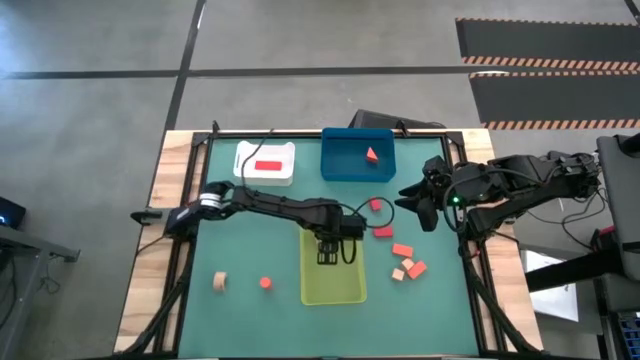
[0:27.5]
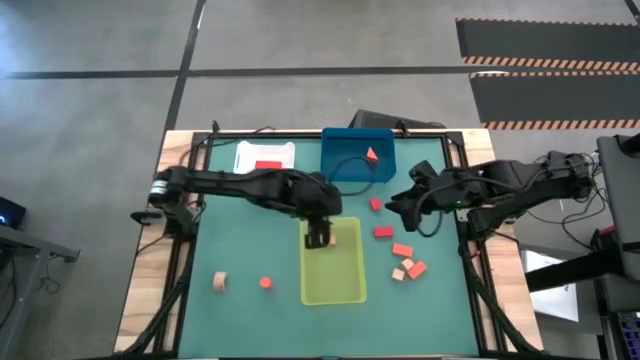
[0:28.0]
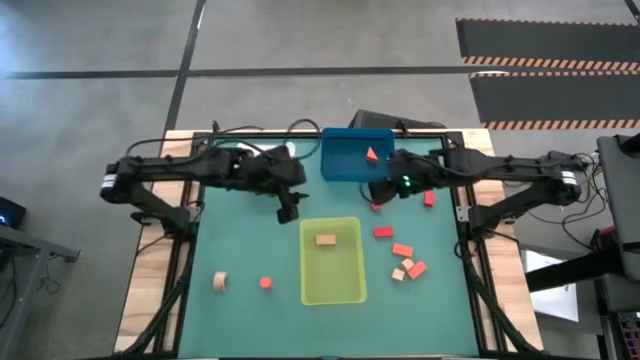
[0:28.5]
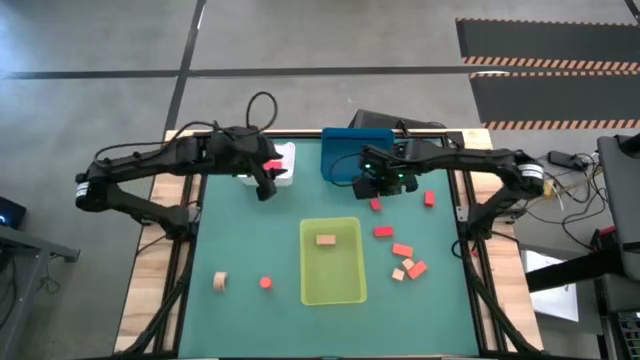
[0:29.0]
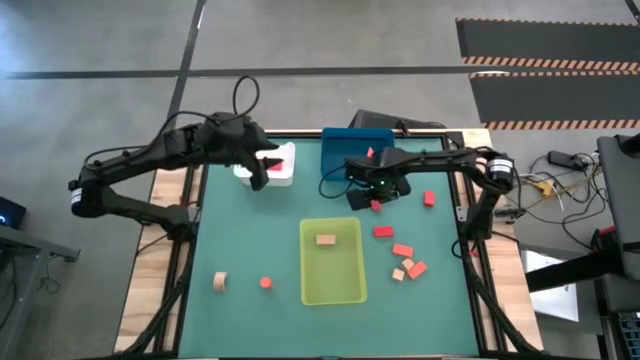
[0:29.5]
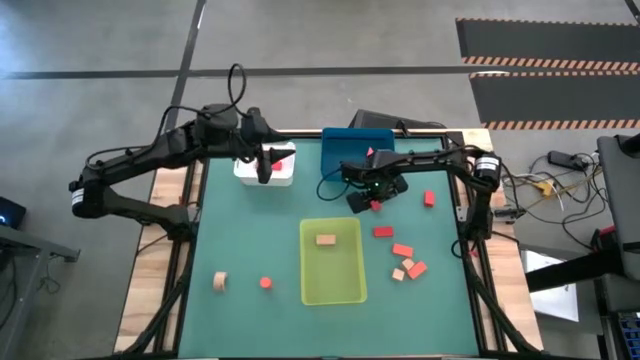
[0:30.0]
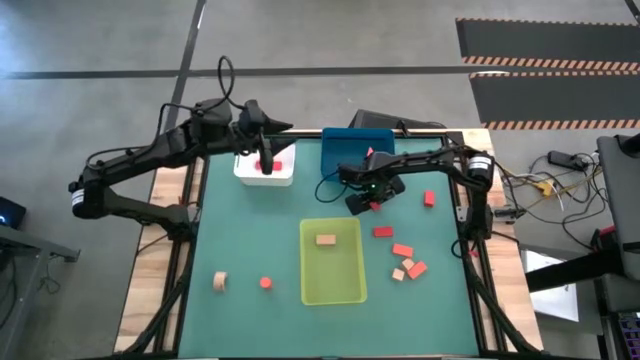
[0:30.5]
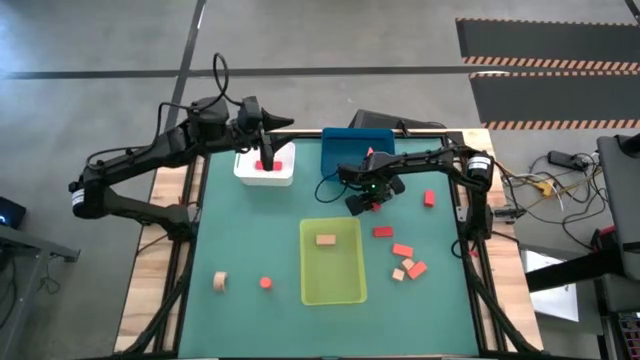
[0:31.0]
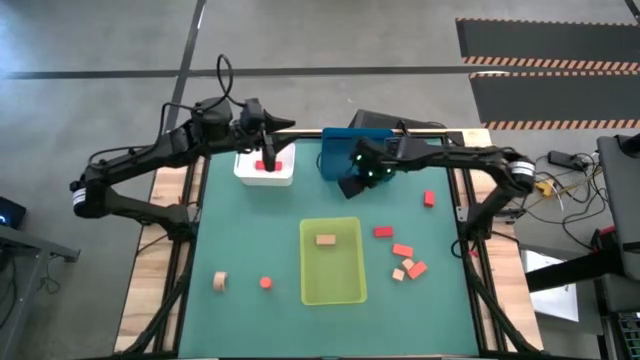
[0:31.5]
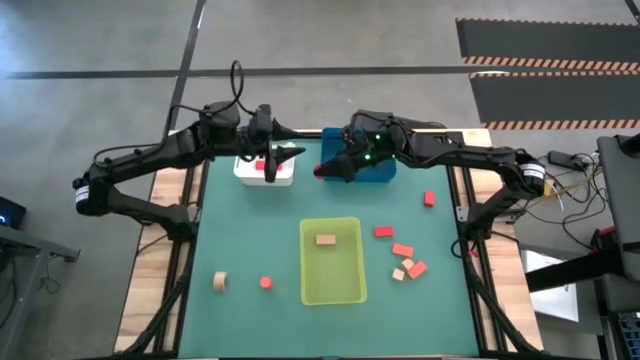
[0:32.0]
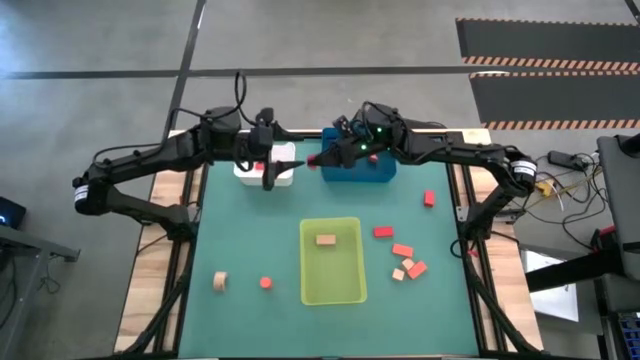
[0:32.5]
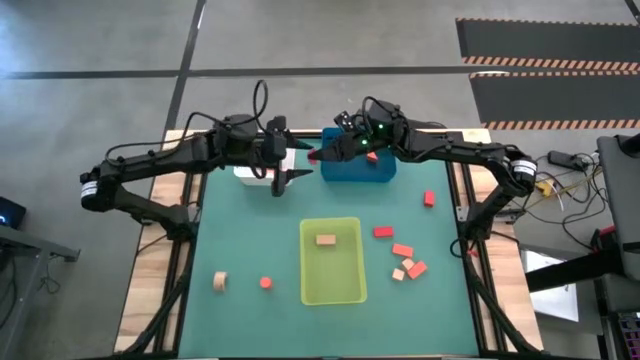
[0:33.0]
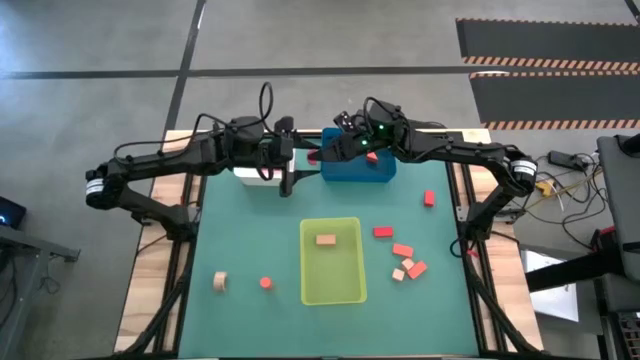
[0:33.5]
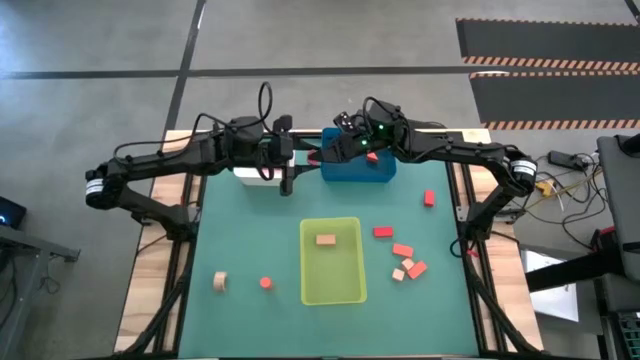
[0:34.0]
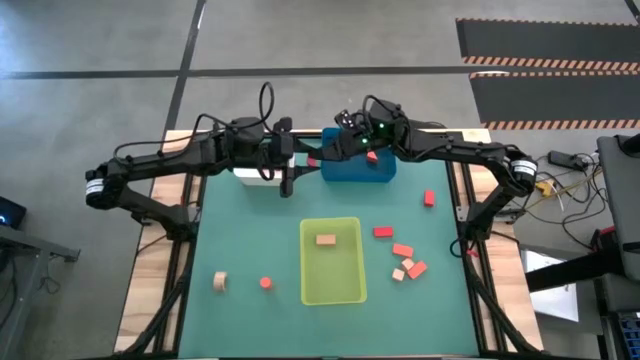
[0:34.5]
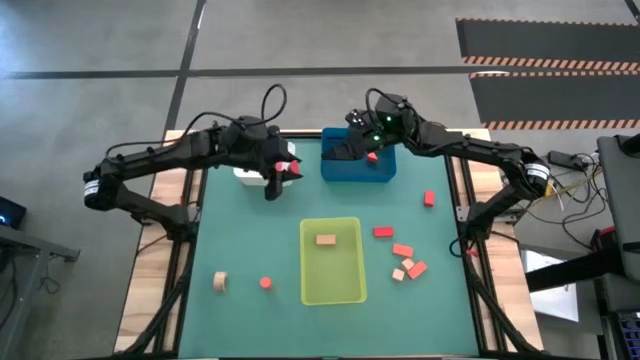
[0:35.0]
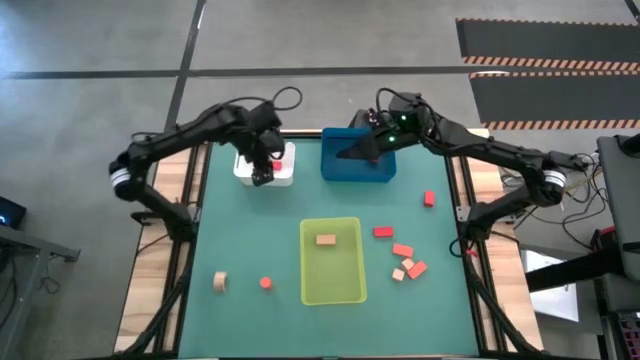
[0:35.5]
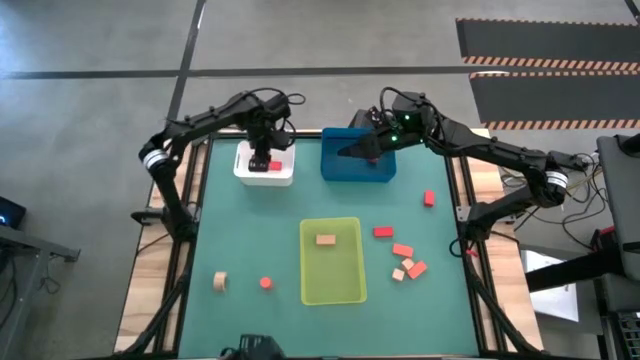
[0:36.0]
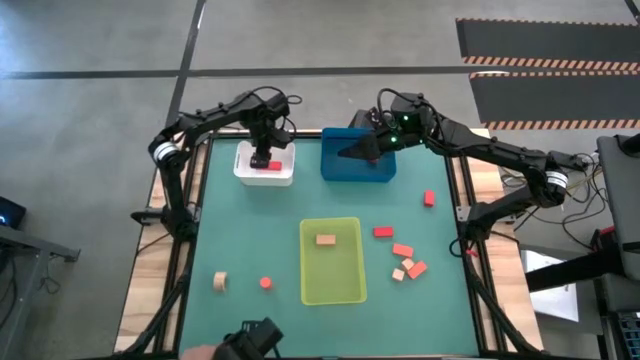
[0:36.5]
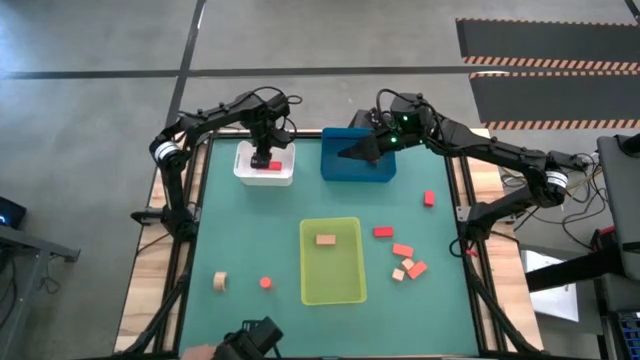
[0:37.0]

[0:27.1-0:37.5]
Task: Sort & place blocks by color
Put the red half-cylinder block into the white bin

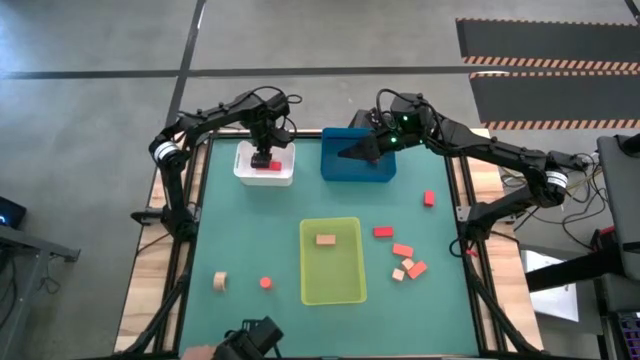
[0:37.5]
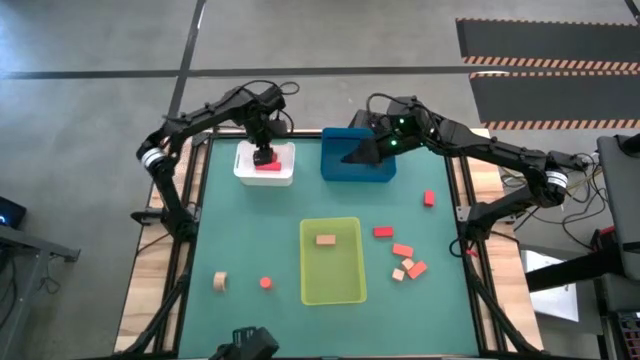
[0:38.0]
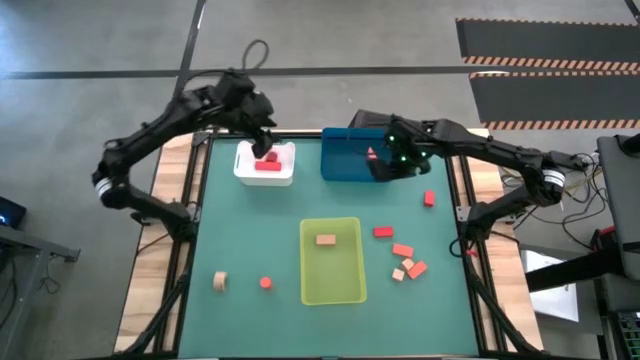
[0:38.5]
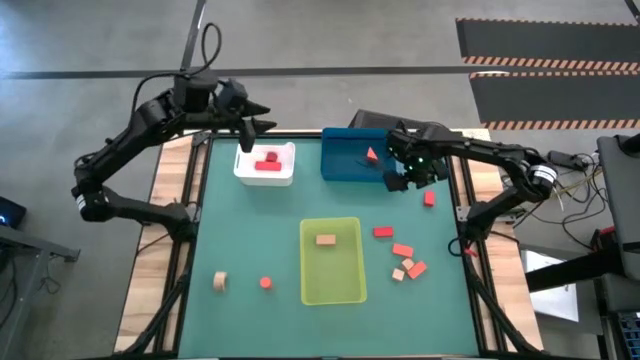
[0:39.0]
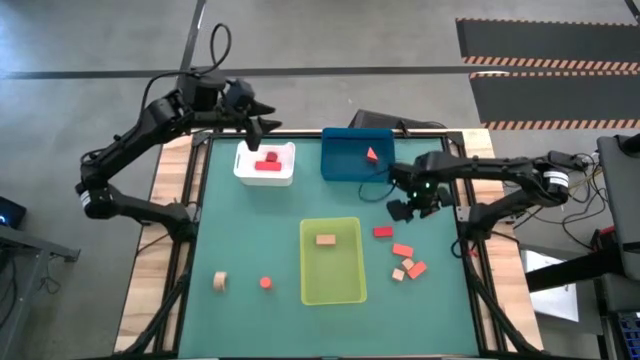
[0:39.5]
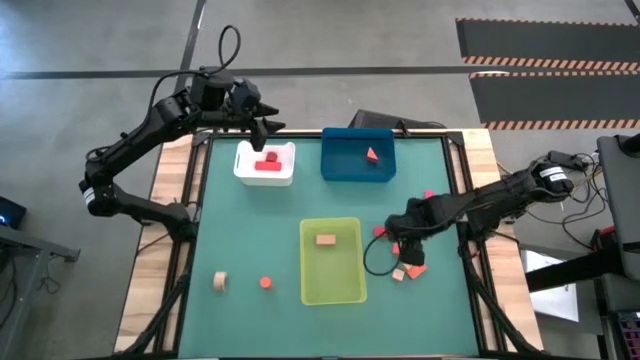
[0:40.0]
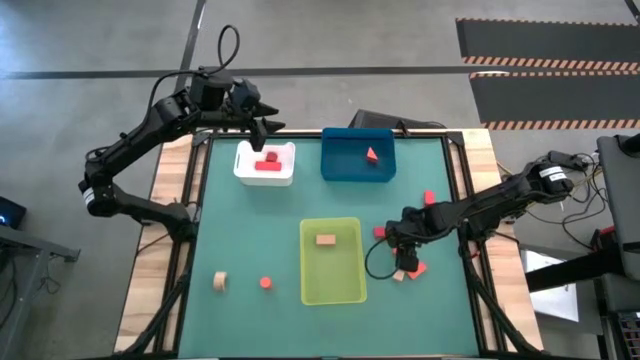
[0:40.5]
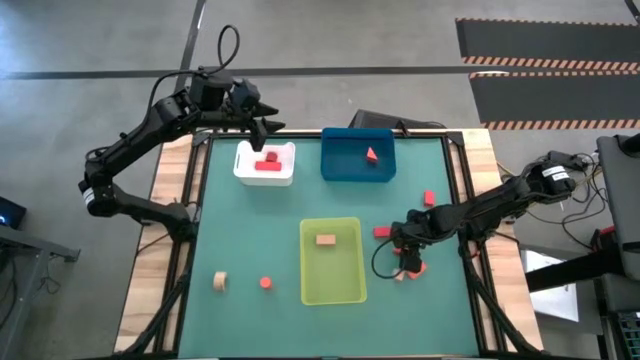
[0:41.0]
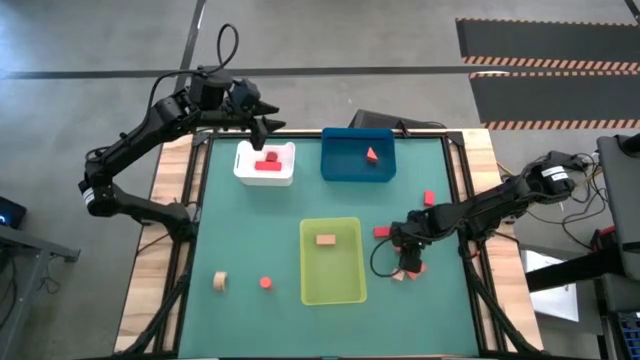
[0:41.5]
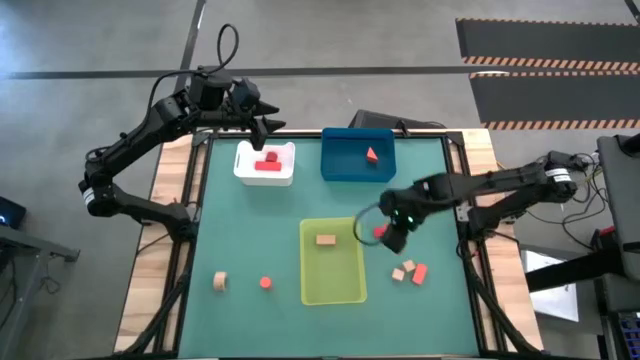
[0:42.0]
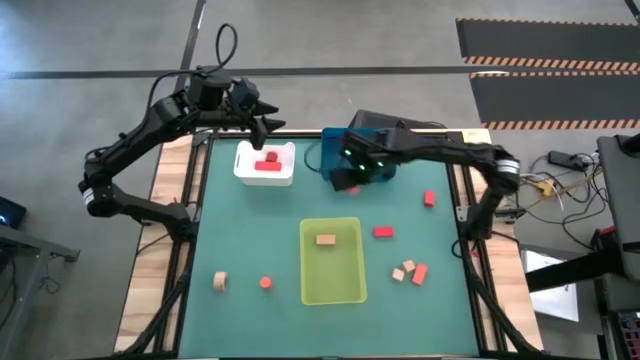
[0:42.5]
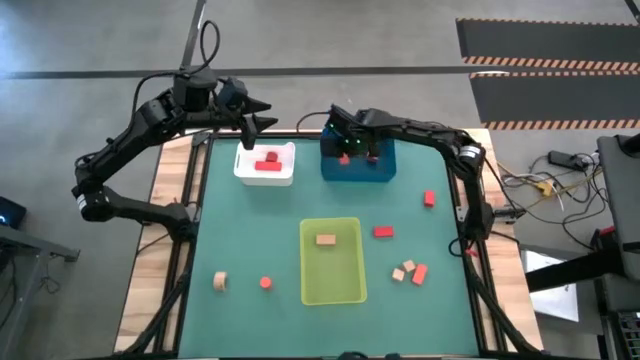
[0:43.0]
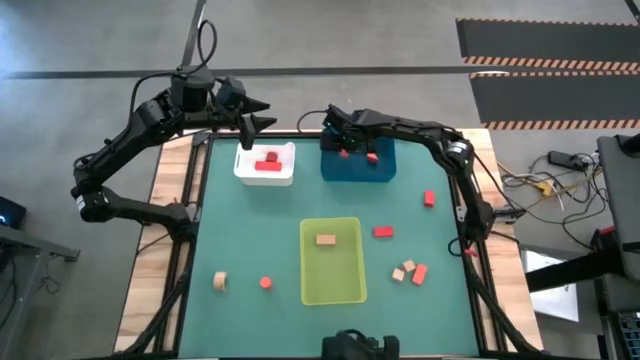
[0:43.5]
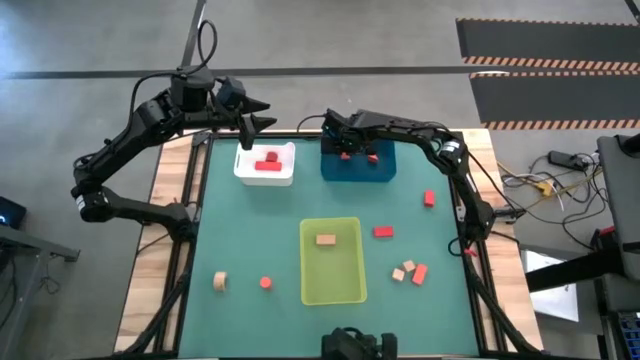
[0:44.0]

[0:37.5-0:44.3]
Put the orange rectangular block into the blue bin

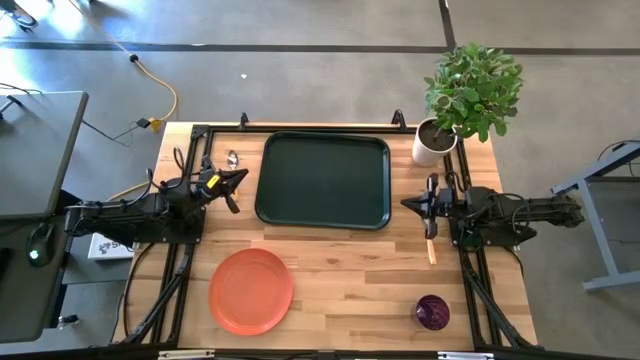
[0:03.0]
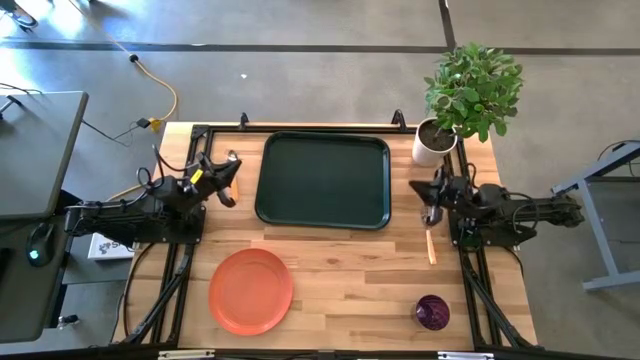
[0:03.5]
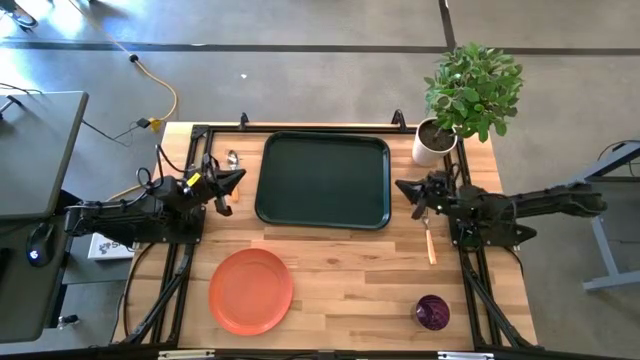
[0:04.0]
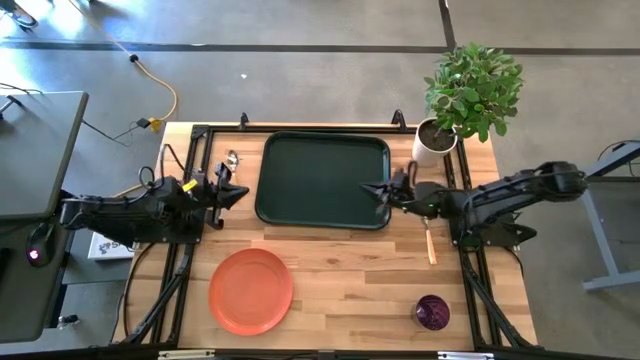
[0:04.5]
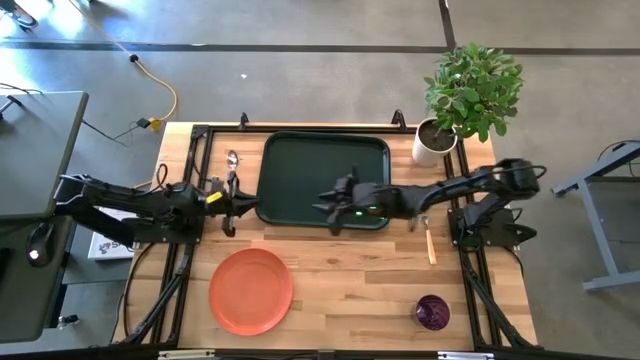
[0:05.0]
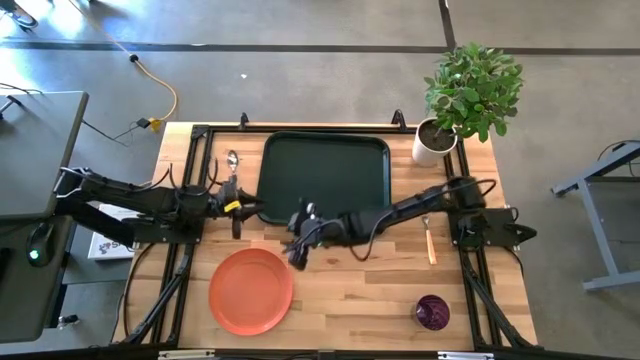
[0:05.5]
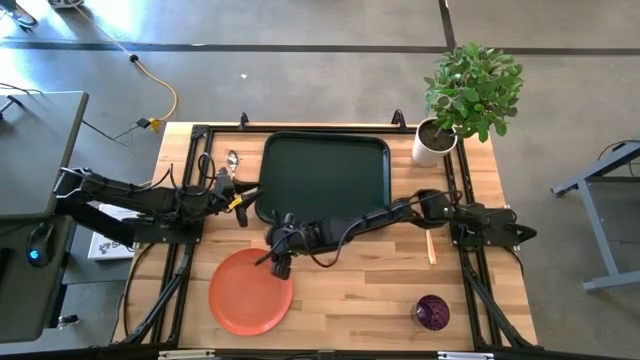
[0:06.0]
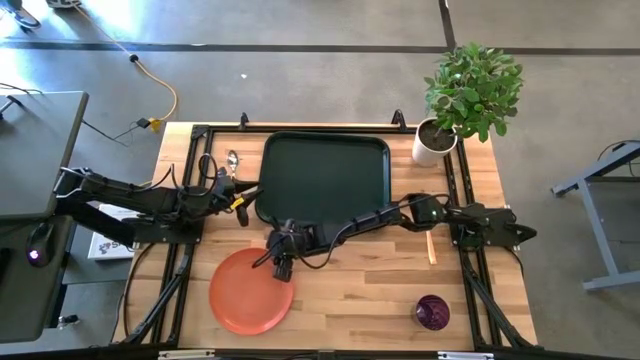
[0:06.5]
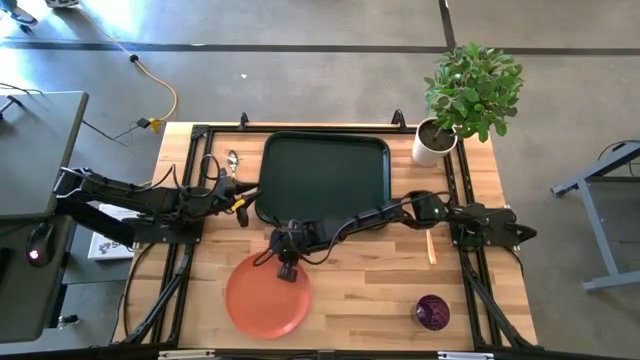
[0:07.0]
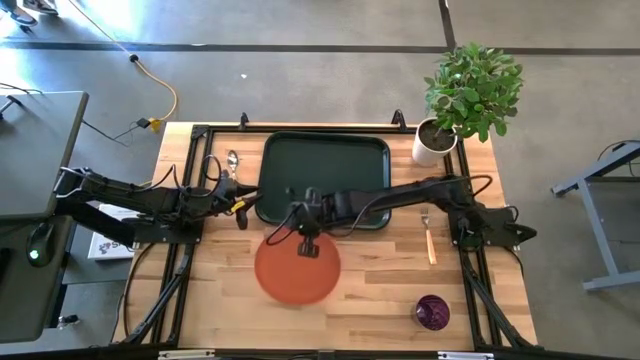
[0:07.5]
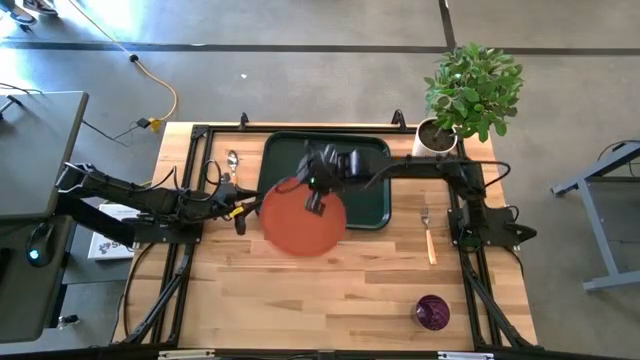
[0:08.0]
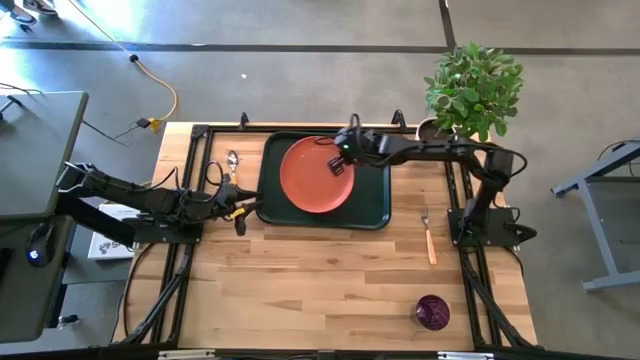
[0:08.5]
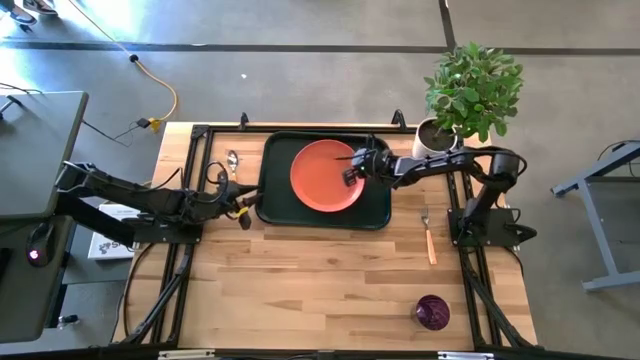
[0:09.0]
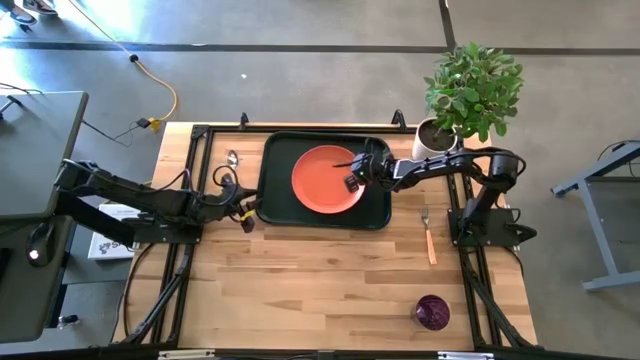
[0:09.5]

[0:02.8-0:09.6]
Task: Pick and place plate/cup/fork/spoon on tray
Put the orange plate on the black tray
